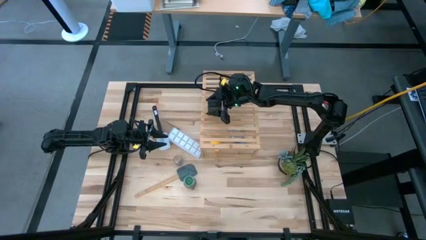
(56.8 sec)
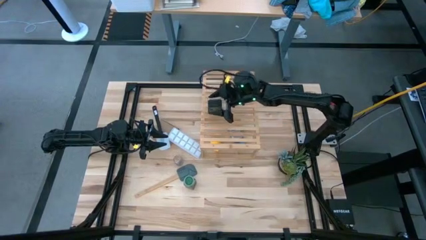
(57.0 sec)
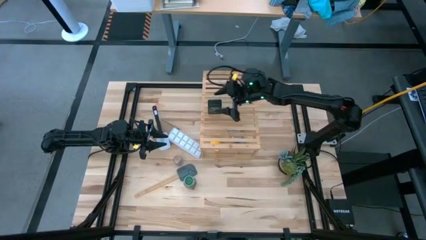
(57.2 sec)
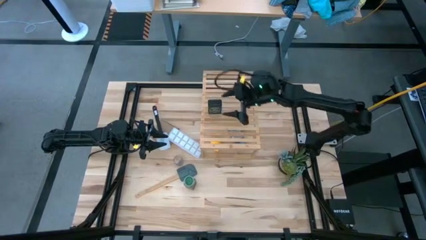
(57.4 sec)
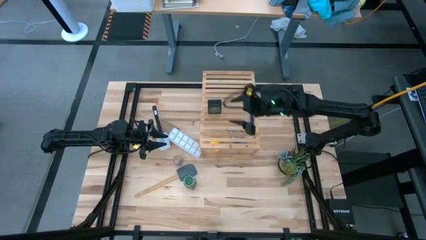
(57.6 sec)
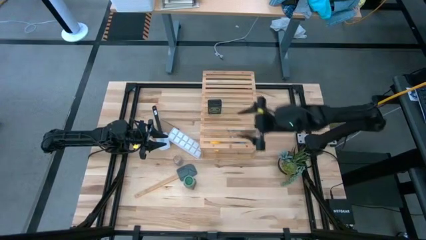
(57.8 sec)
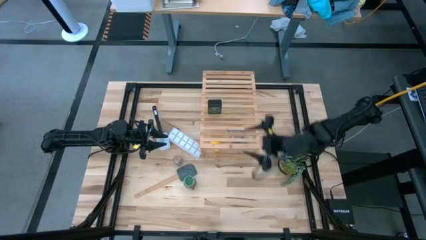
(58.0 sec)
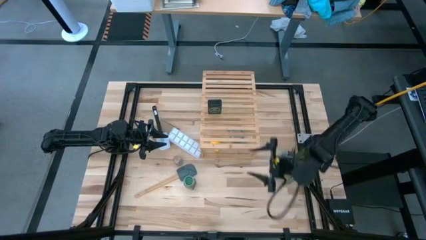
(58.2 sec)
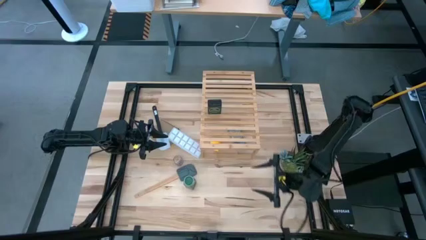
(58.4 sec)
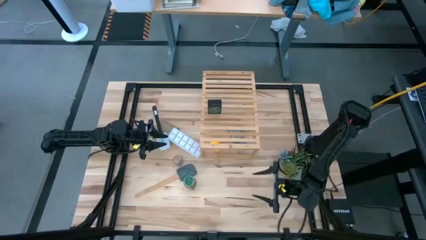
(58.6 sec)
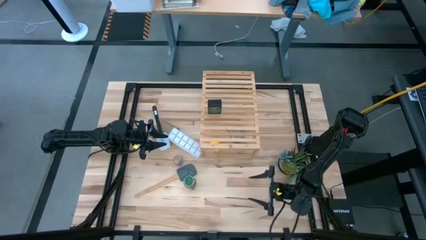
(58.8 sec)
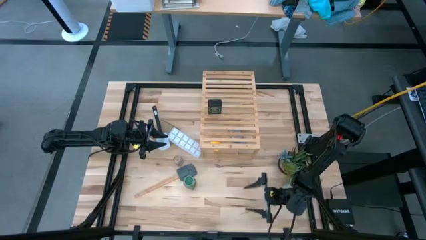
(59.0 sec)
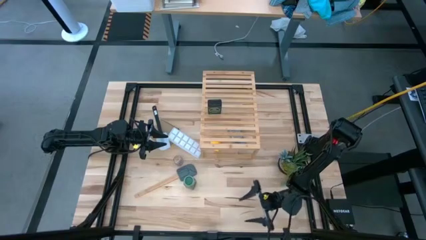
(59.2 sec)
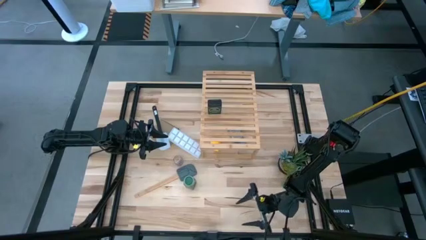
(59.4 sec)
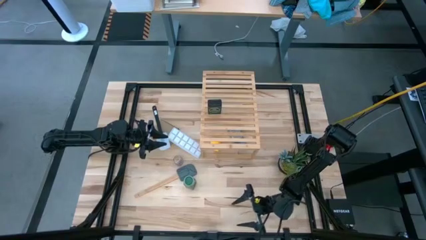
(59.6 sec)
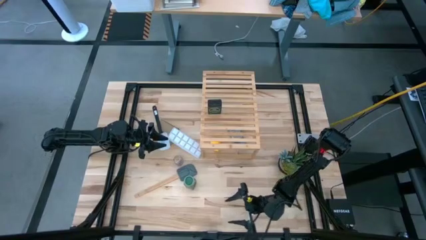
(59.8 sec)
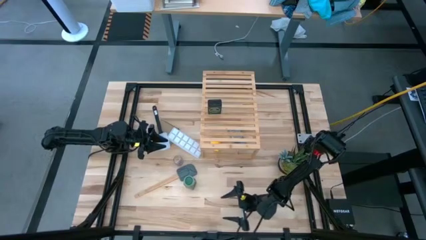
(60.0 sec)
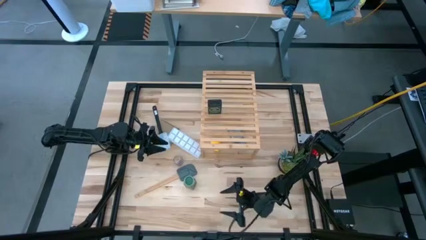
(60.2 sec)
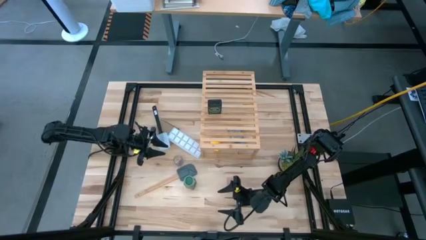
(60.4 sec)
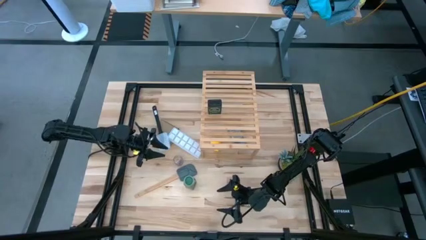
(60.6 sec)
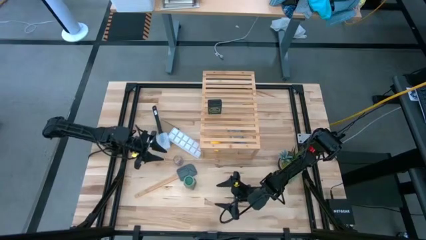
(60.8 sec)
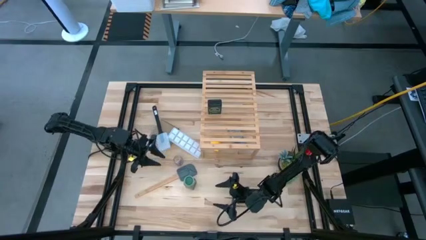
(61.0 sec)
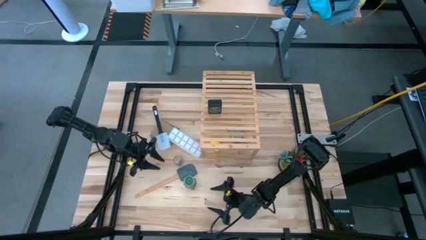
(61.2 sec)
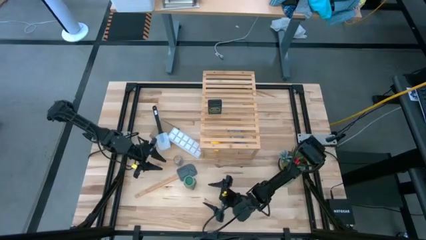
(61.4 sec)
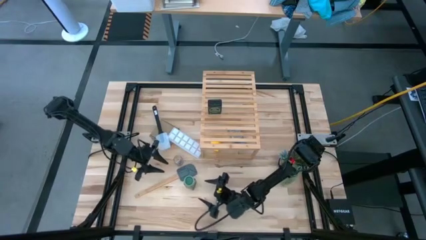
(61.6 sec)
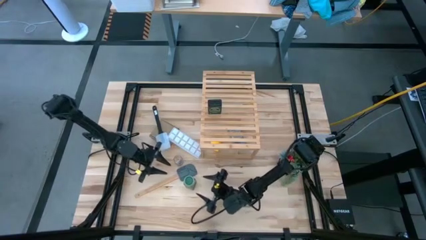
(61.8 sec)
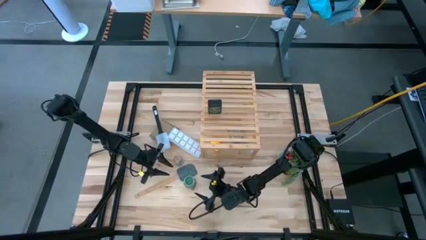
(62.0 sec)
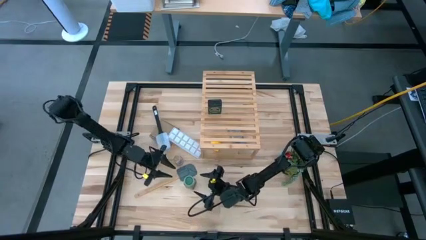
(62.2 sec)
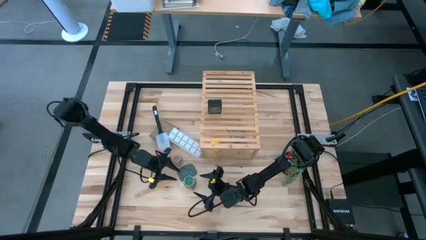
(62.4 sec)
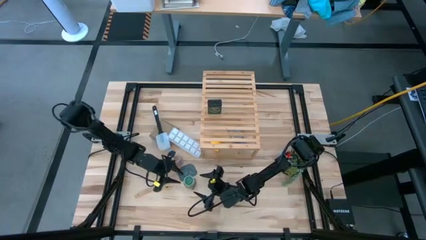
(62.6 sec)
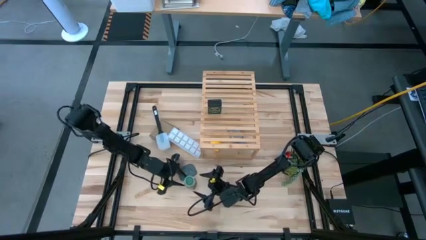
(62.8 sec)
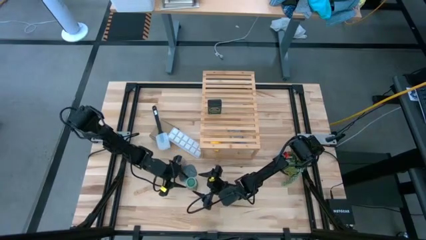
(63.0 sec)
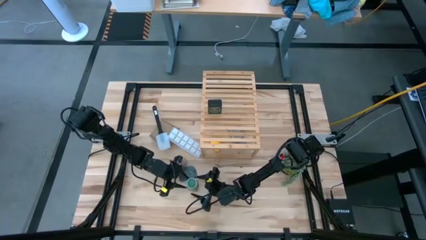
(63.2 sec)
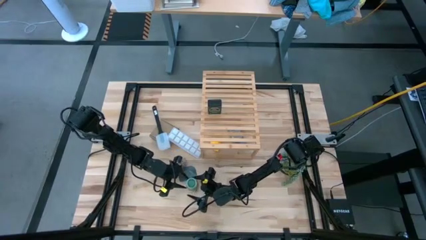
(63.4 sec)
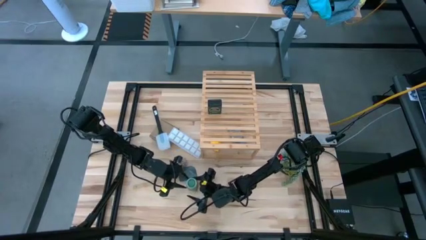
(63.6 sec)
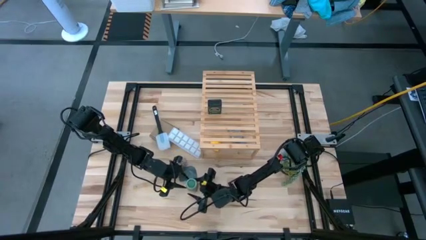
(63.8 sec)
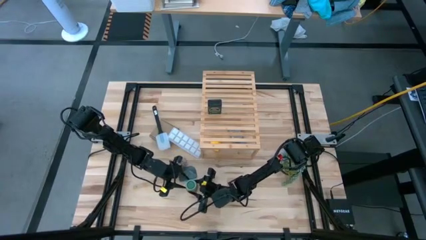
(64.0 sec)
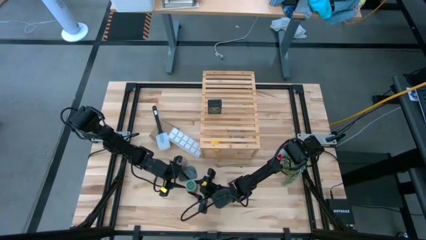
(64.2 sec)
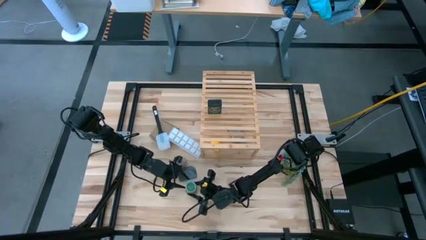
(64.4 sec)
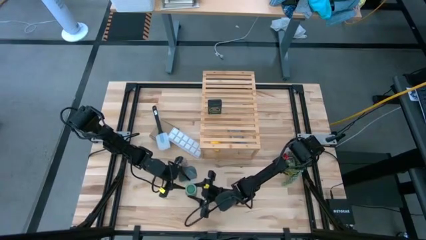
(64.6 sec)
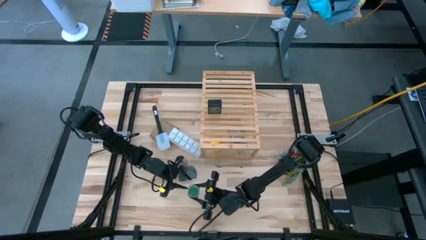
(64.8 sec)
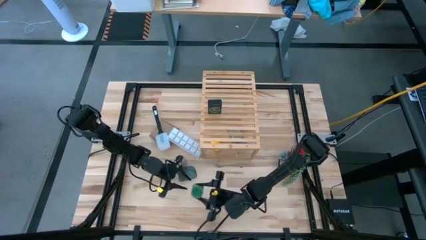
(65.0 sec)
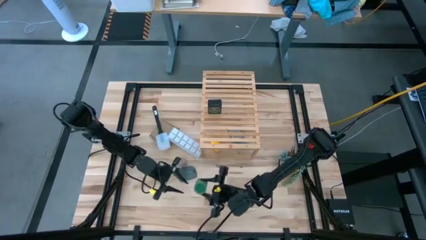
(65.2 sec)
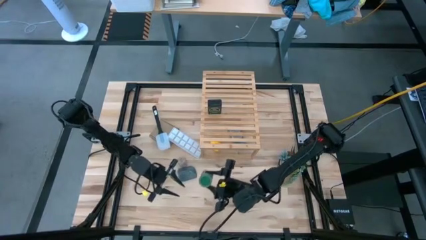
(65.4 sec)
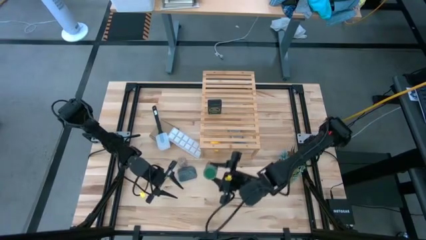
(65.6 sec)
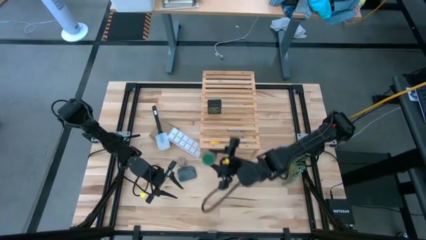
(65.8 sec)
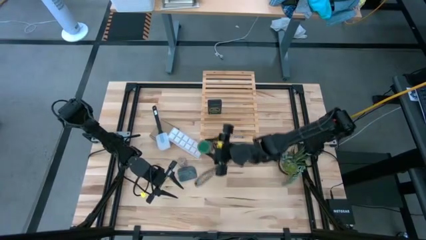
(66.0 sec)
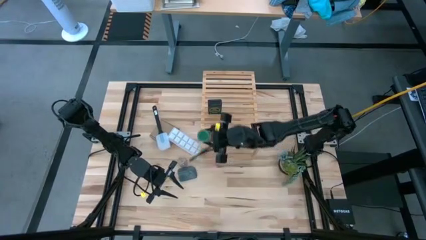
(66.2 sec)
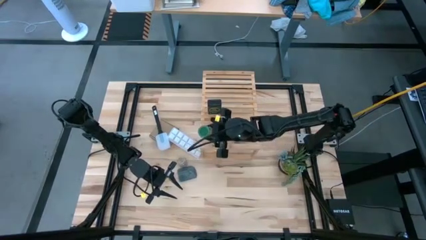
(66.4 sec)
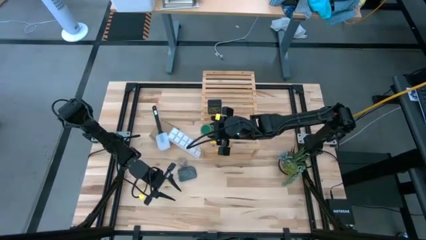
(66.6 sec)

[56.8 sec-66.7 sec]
Task: Shelf spices
Put the green seasoning bottle on the shelf
